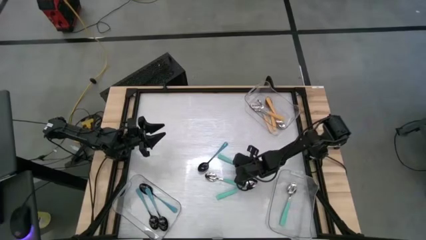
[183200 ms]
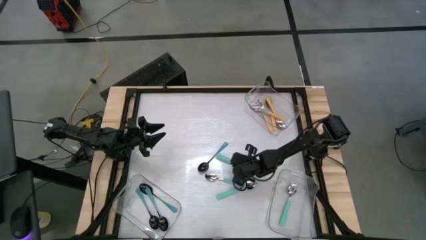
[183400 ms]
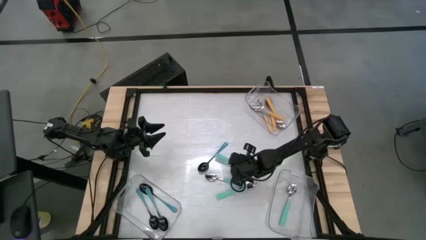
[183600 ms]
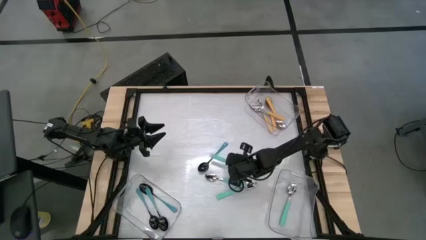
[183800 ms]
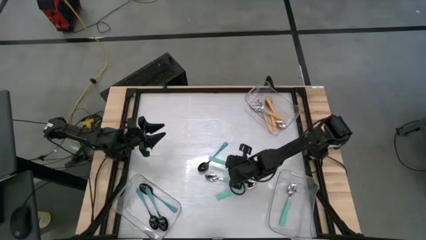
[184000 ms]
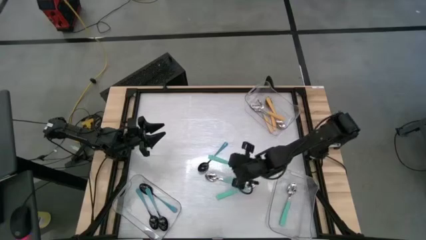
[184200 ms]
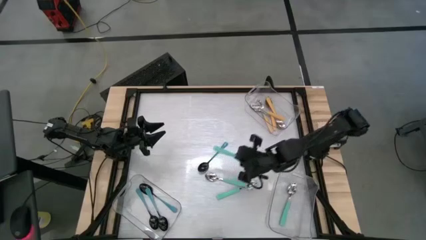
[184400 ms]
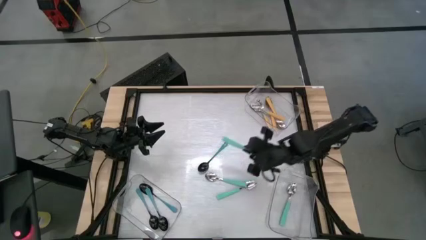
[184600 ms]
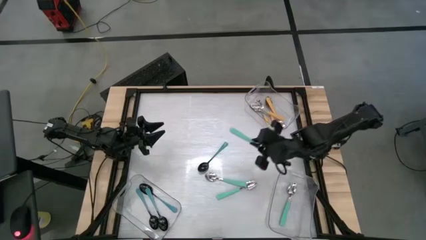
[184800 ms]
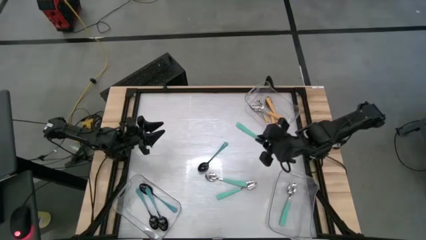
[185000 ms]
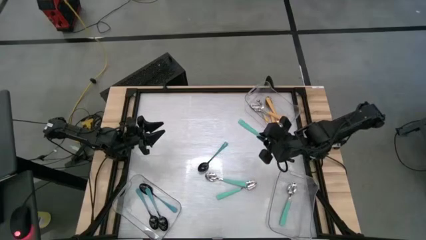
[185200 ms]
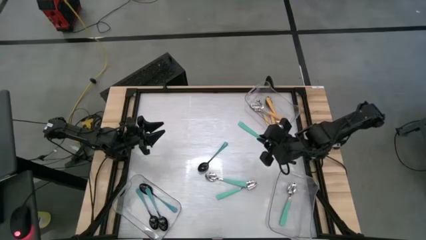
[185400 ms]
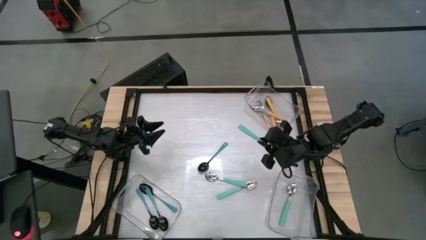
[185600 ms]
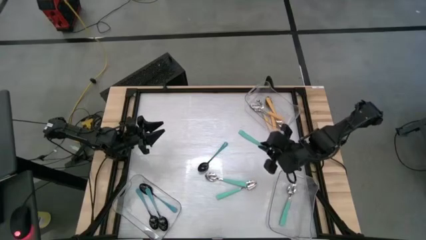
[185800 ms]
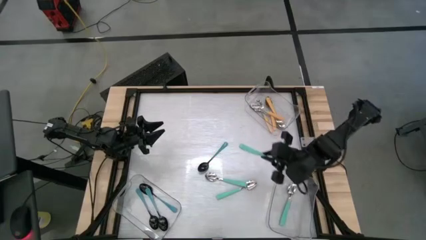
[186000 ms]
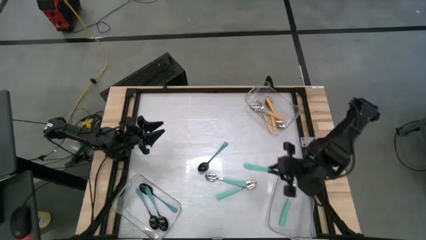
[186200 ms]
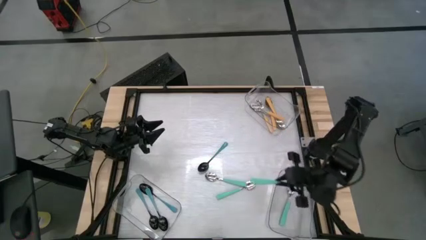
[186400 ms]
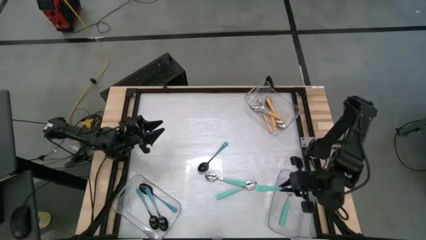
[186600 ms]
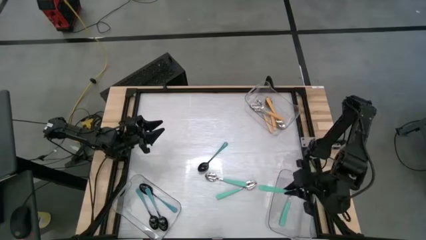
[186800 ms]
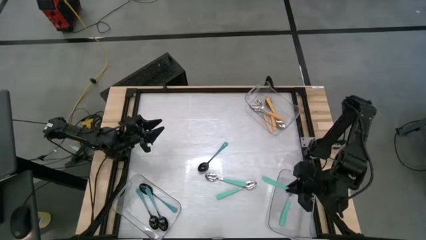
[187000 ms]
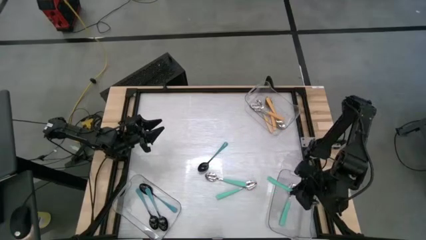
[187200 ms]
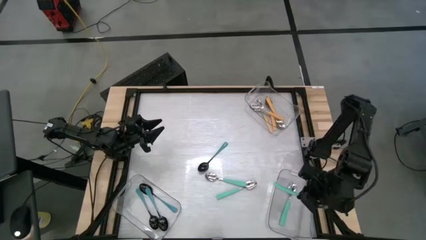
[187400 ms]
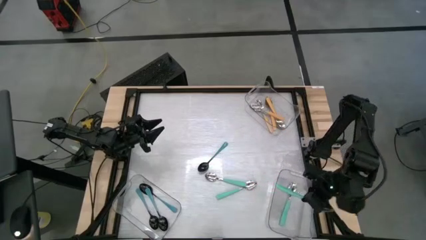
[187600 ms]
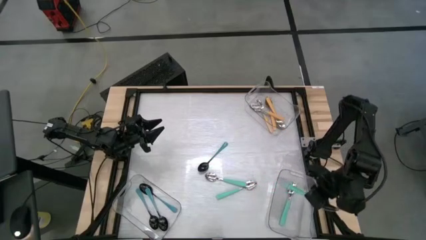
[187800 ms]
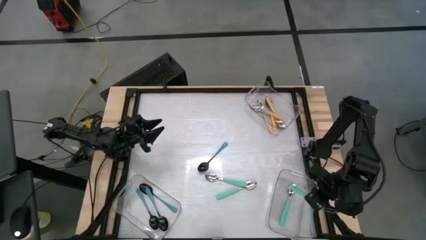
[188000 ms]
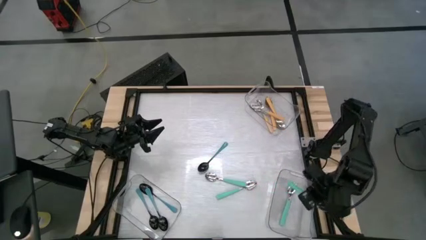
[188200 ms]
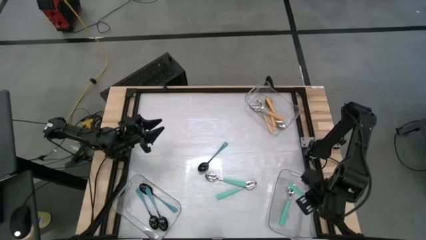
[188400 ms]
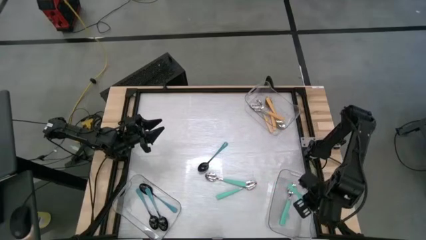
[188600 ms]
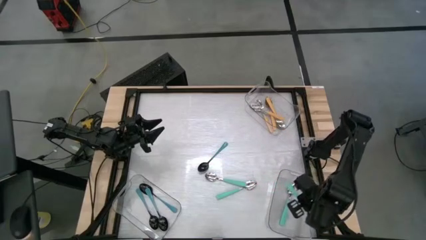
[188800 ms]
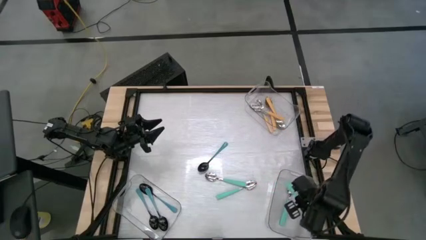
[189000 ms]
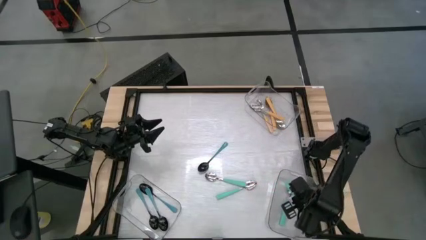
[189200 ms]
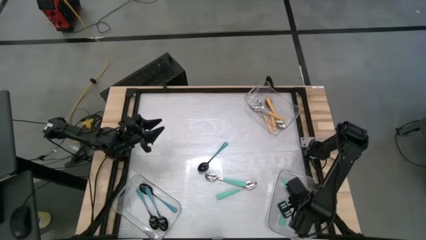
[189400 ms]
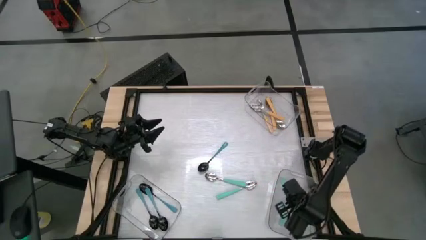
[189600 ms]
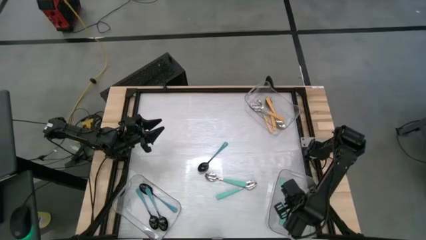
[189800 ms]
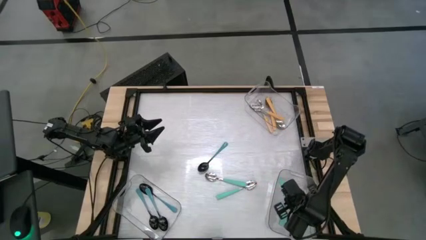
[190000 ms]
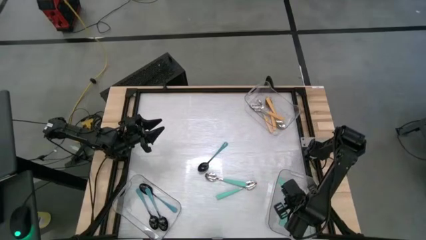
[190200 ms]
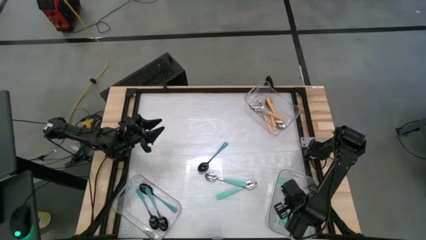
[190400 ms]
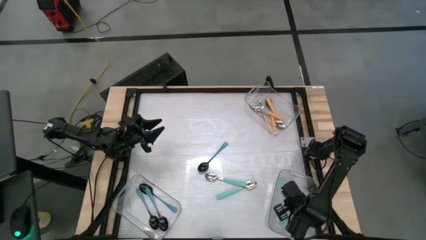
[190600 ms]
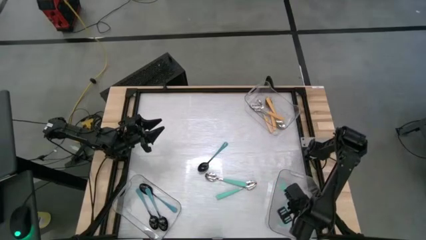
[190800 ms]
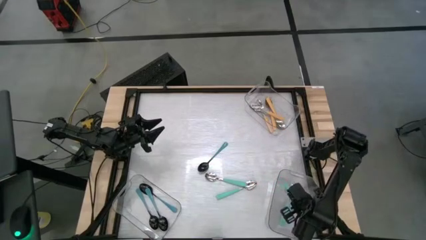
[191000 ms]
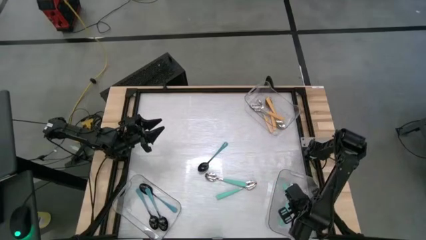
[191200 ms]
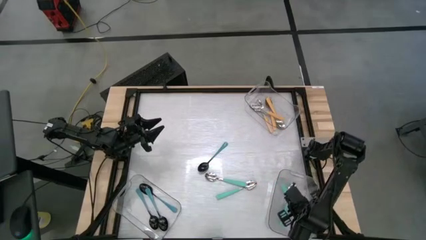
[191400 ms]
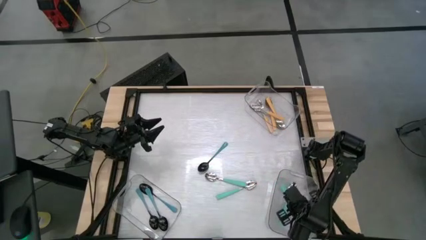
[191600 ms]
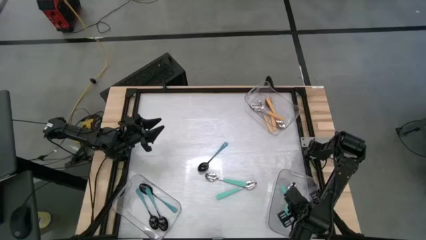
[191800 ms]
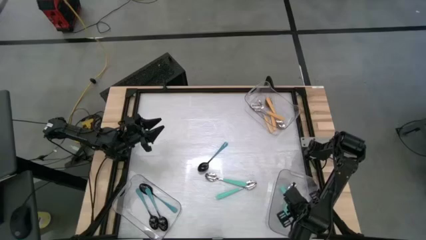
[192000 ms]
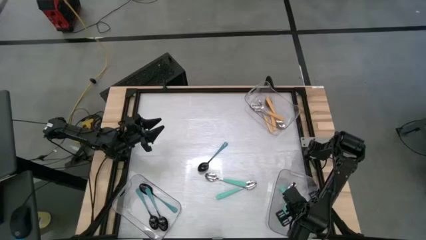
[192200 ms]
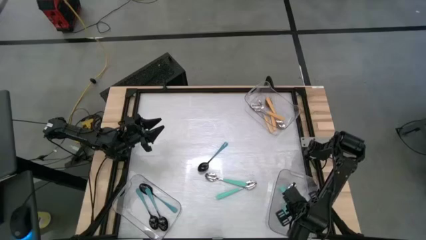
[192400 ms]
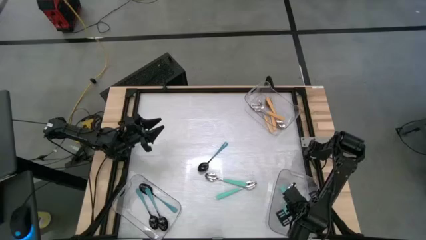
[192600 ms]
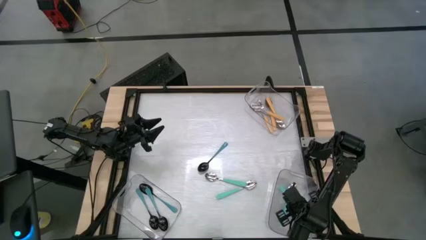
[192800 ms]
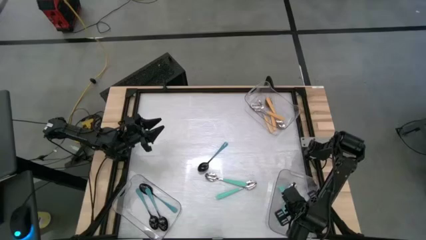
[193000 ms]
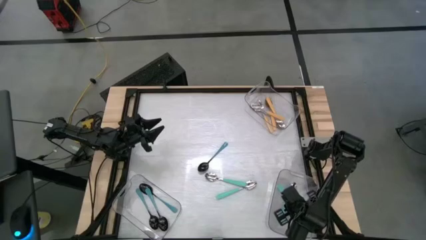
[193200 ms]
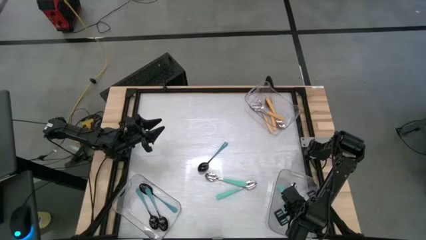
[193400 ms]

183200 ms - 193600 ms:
Task: Sort silverware by color (type)
Put the green spoon into the bottom right transparent bin

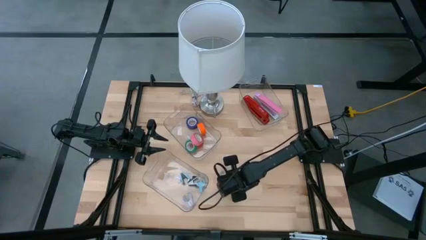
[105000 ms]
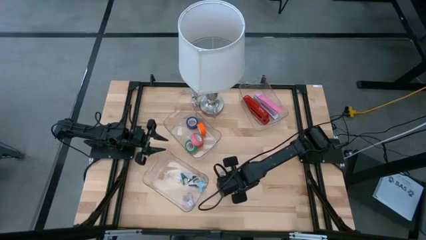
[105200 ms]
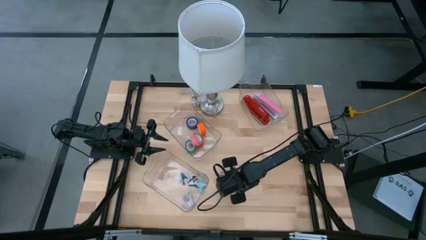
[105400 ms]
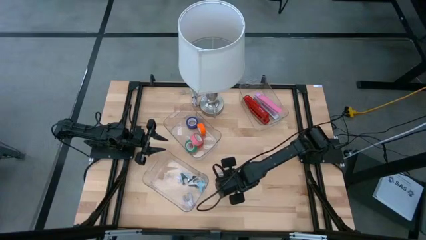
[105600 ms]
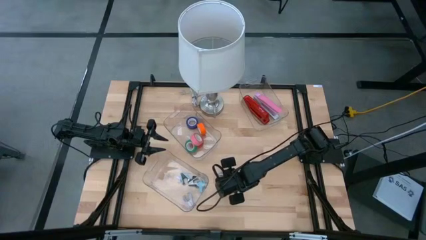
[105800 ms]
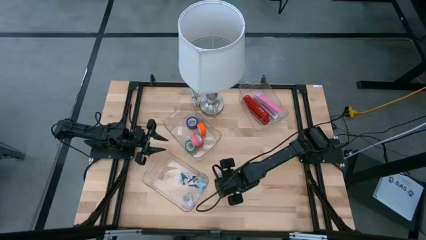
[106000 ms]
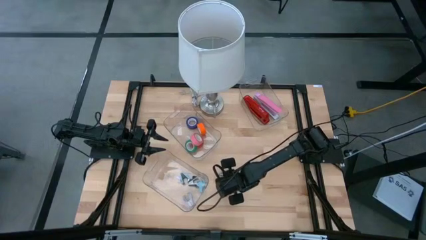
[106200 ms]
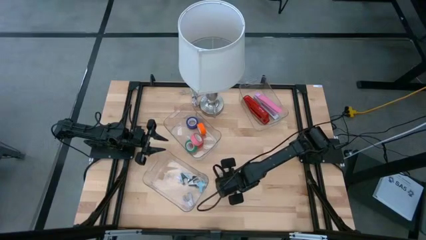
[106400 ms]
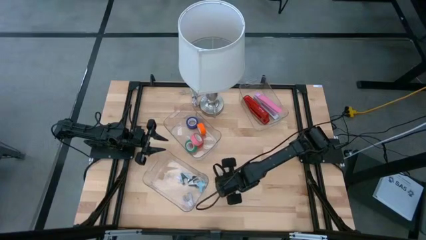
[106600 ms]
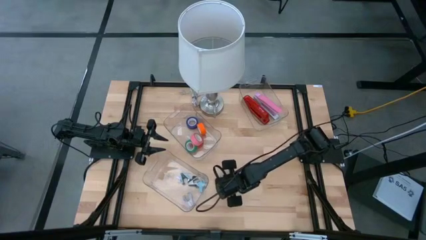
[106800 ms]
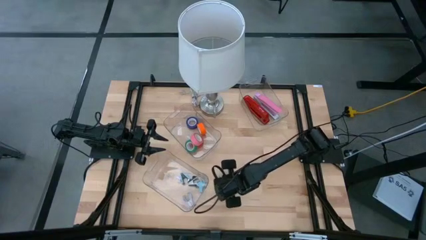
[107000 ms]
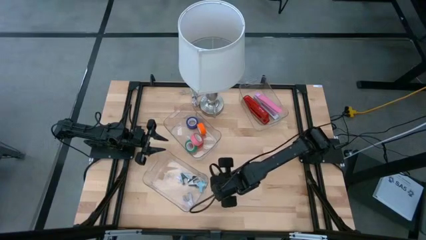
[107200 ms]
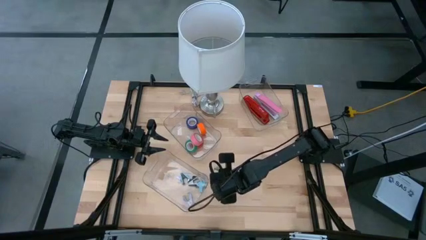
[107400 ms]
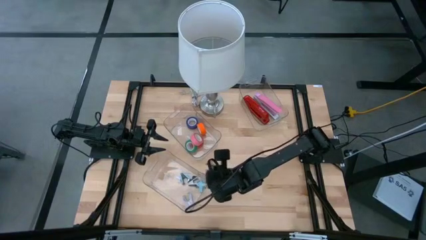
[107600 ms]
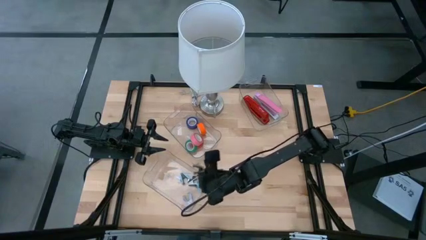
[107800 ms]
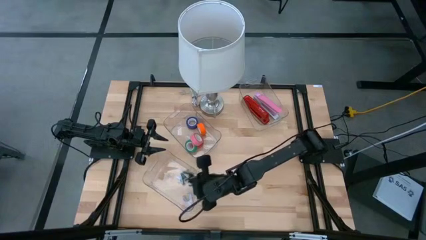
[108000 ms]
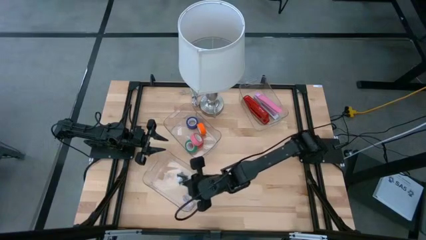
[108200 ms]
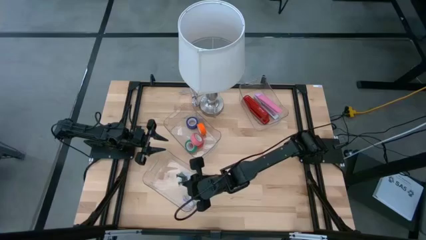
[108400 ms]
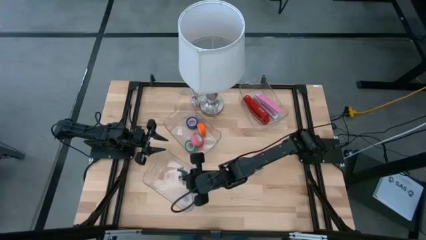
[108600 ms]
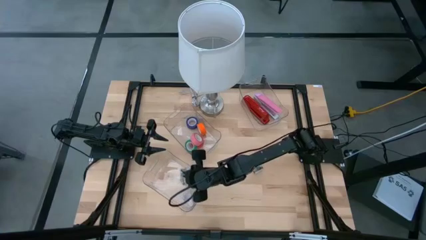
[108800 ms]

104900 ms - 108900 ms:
Task: Pick and place Stapler, Stapler remover, tape
Put the gray staple remover into the bottom transparent bin
